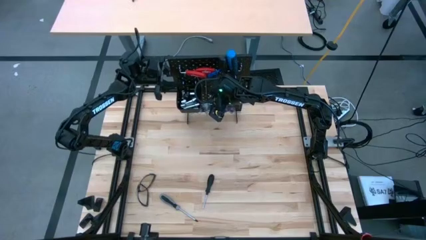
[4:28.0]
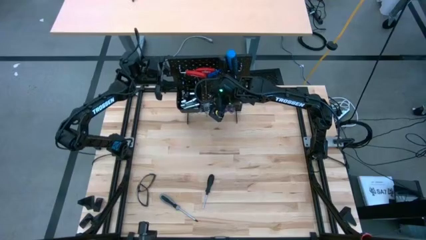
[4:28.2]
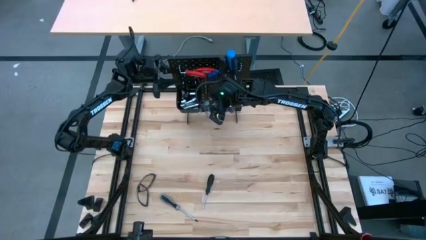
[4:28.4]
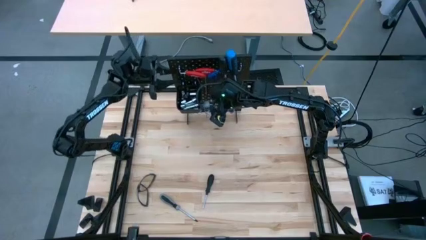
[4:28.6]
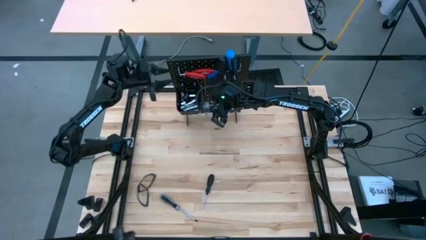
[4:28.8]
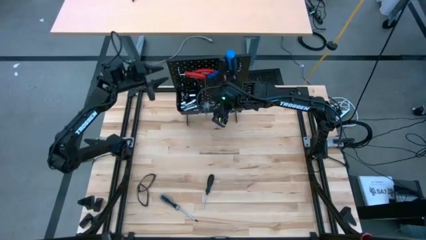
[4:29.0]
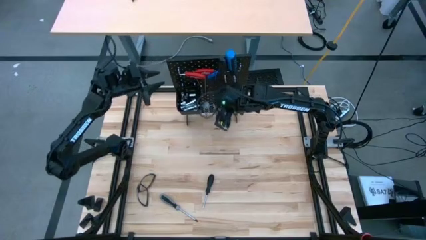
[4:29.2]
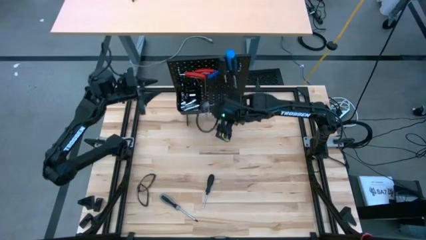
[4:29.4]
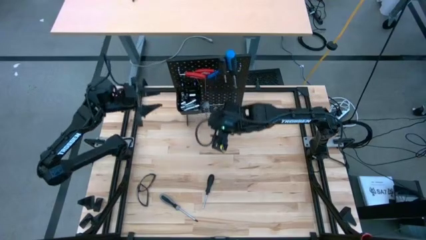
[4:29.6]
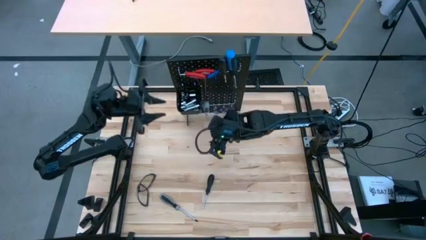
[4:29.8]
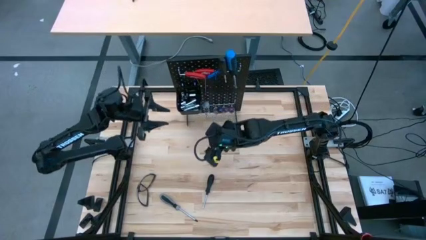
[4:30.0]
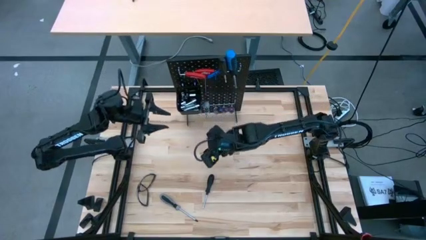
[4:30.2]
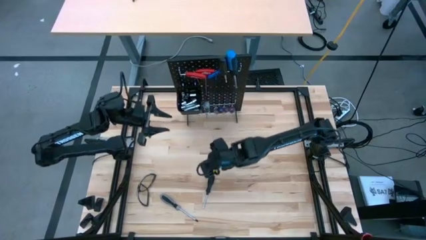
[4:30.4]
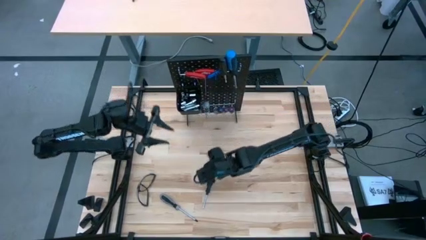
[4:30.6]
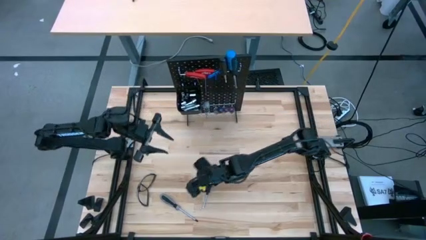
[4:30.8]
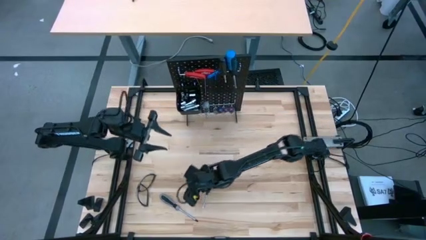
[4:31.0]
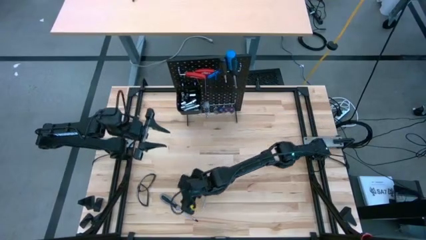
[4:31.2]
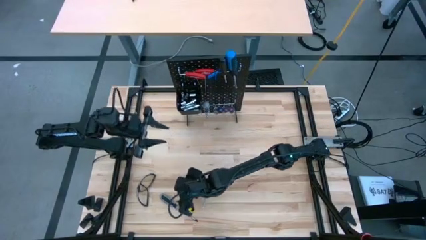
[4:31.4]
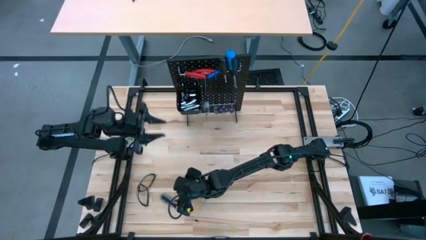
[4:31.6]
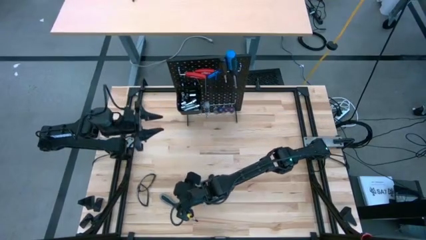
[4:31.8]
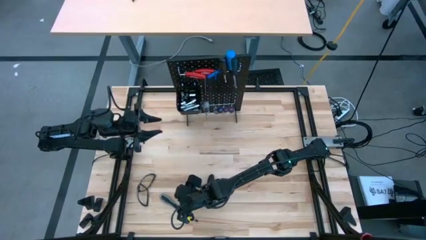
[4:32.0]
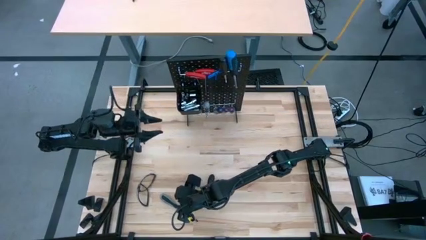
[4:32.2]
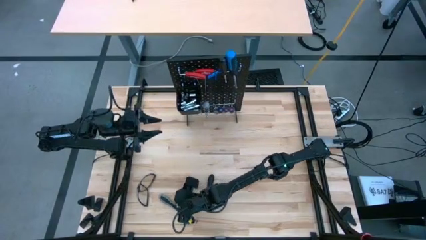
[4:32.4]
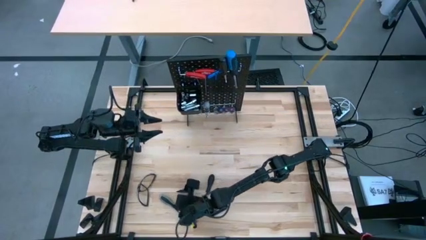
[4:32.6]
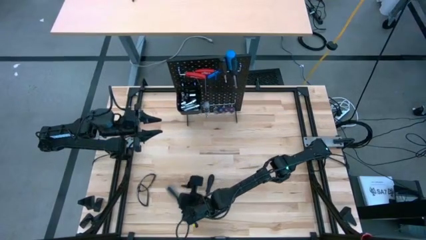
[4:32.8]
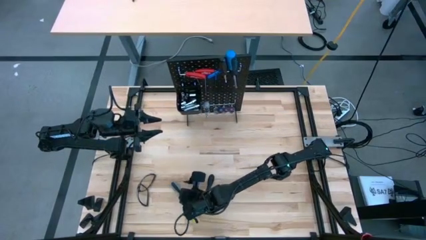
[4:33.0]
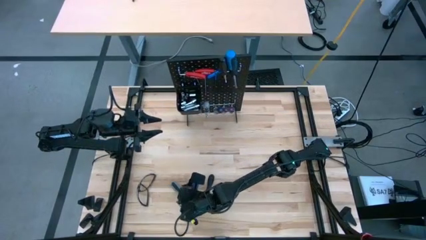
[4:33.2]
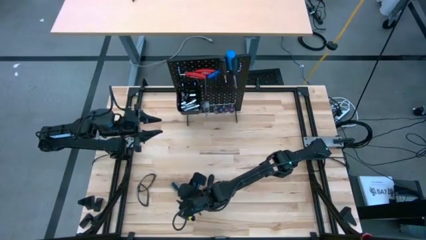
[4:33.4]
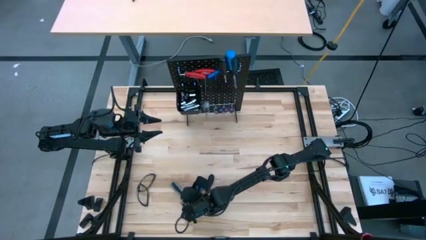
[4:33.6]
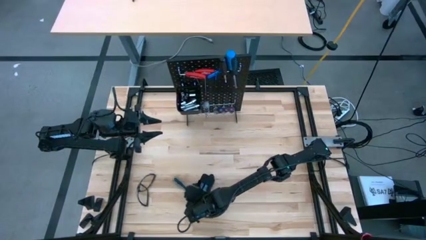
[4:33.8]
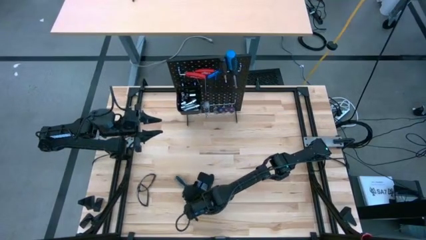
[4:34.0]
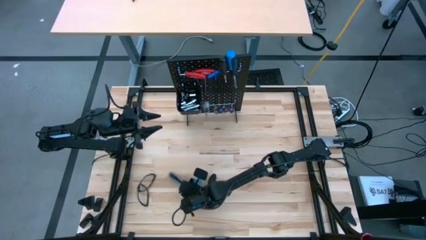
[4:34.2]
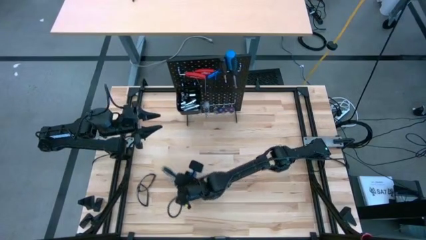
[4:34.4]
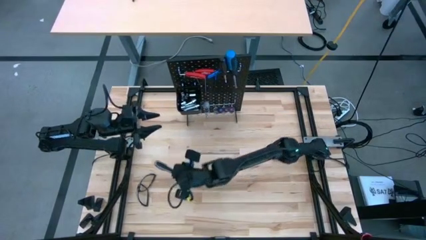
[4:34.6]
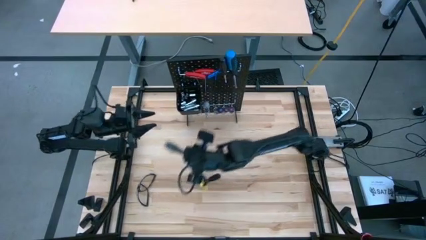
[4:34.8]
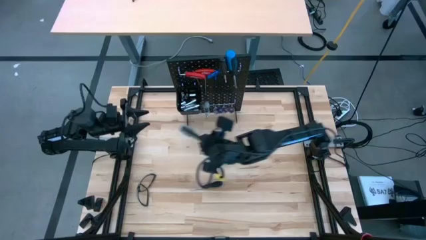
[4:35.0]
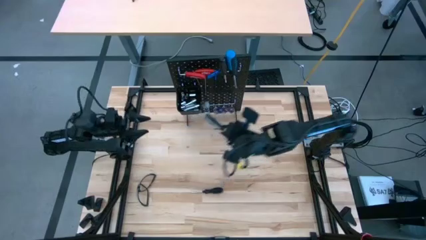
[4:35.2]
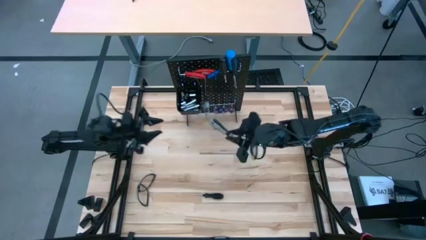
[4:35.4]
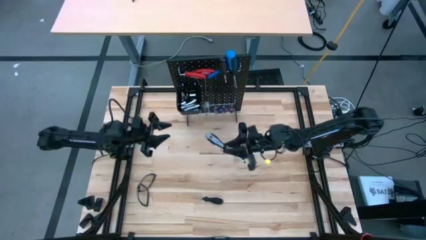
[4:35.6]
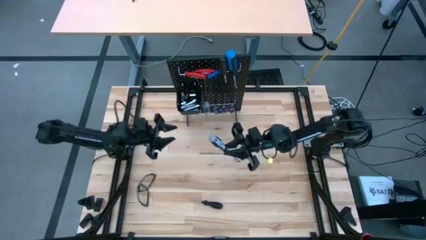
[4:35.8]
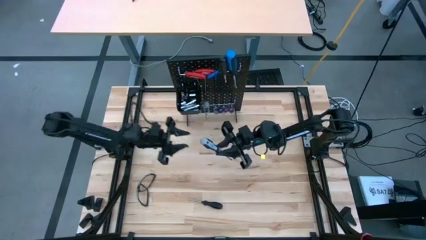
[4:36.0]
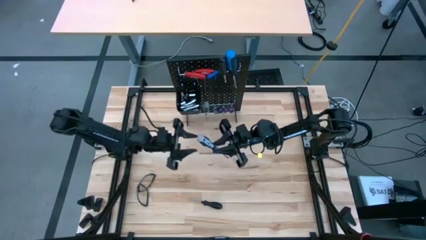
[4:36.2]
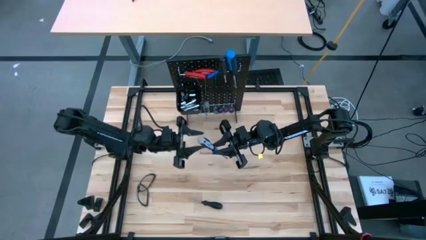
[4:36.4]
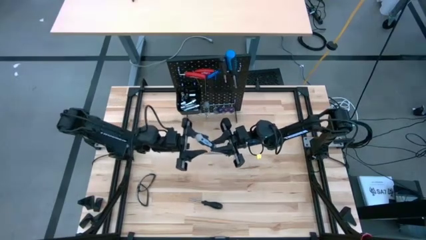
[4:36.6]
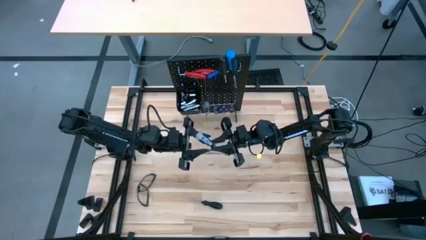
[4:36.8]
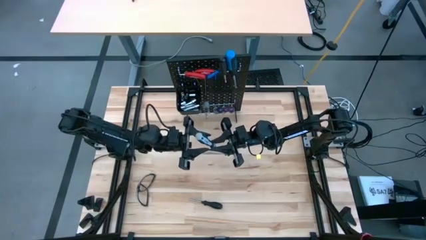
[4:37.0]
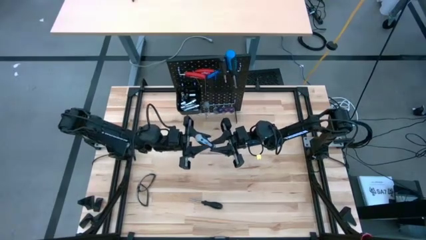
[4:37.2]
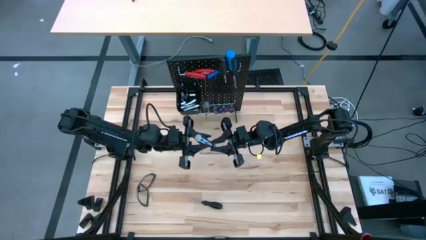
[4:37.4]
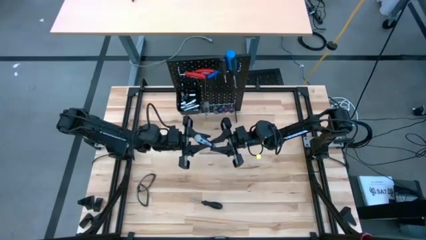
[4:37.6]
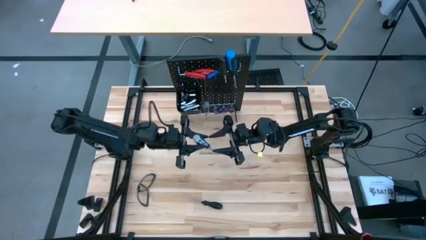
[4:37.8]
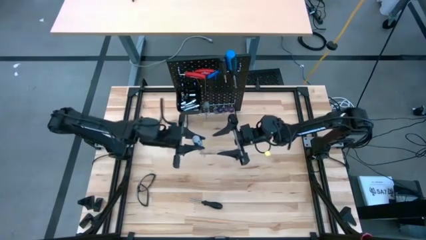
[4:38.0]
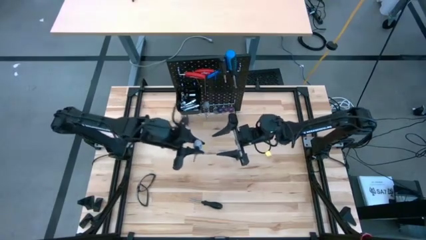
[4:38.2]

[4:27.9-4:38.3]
Task: Hang tools onto peg board
Hang the gray screwdriver on the pegboard

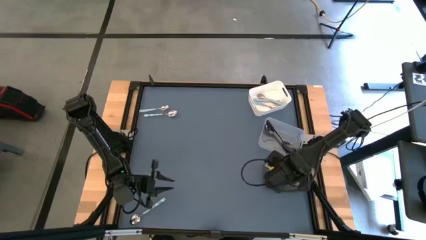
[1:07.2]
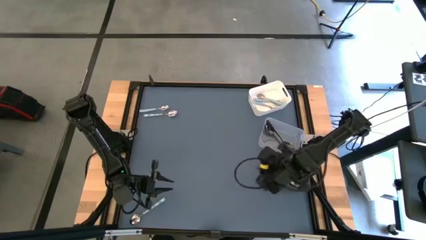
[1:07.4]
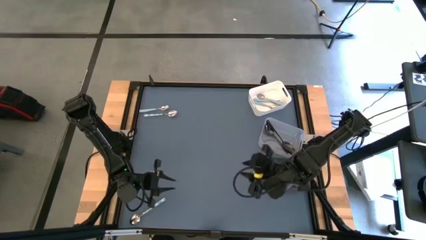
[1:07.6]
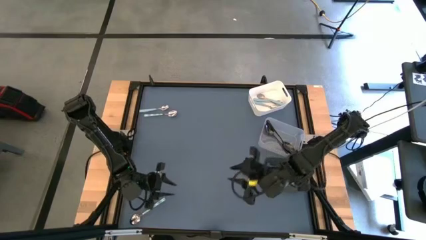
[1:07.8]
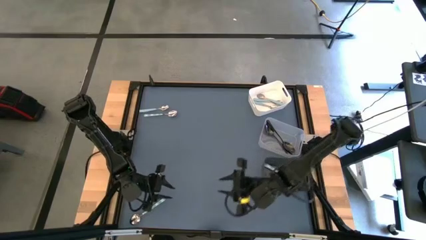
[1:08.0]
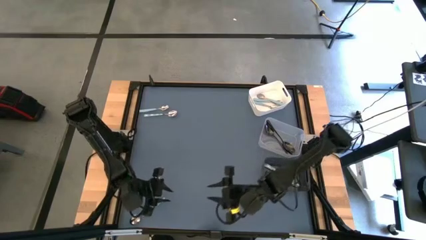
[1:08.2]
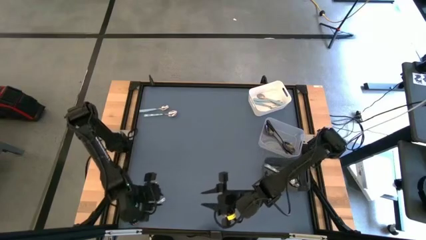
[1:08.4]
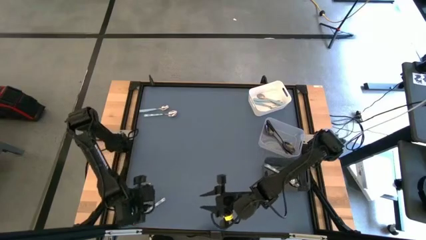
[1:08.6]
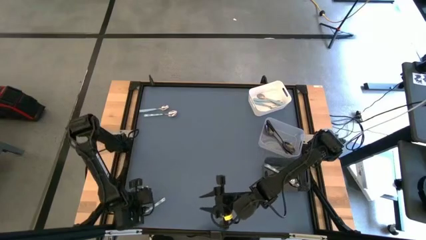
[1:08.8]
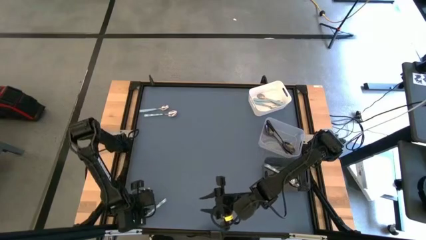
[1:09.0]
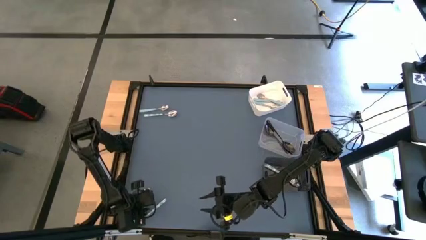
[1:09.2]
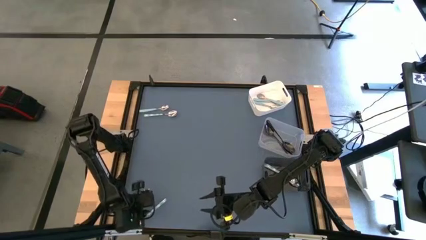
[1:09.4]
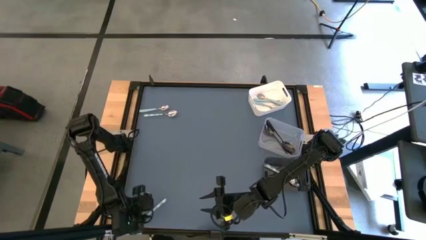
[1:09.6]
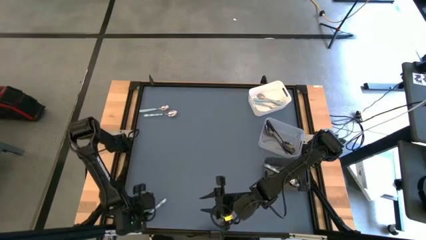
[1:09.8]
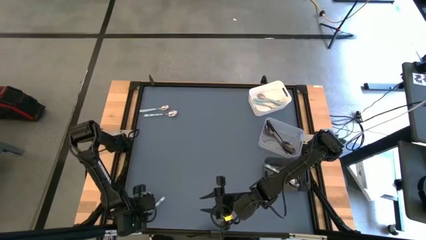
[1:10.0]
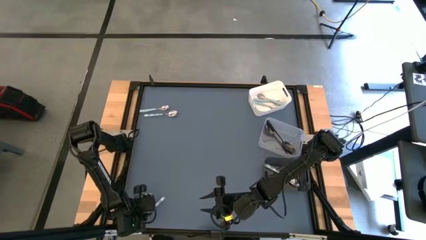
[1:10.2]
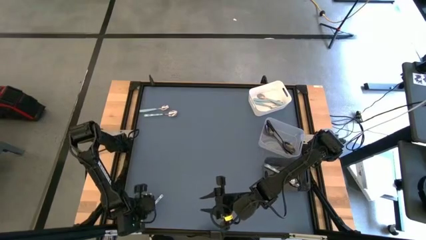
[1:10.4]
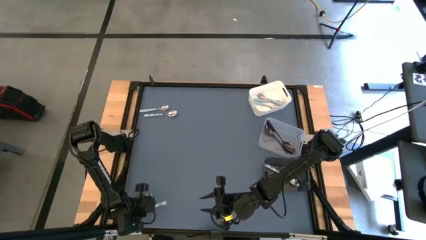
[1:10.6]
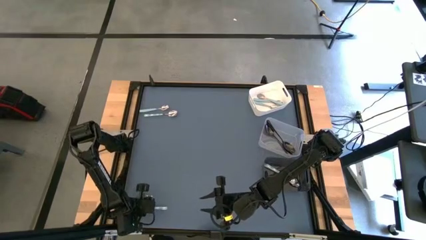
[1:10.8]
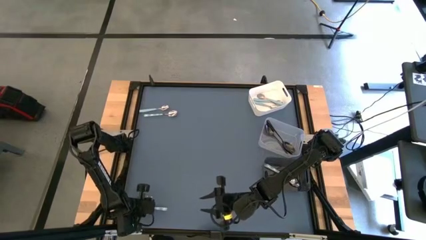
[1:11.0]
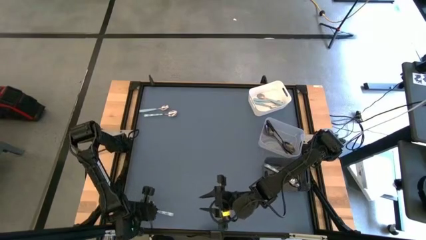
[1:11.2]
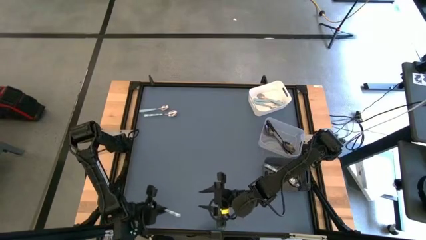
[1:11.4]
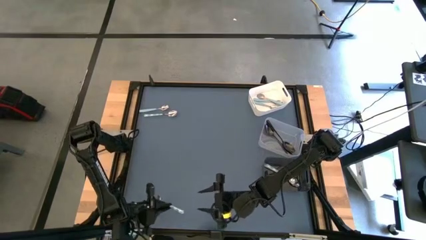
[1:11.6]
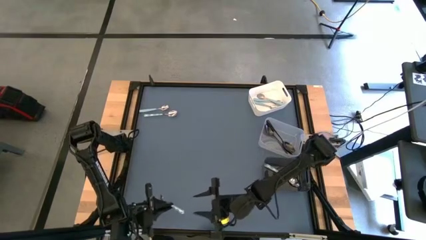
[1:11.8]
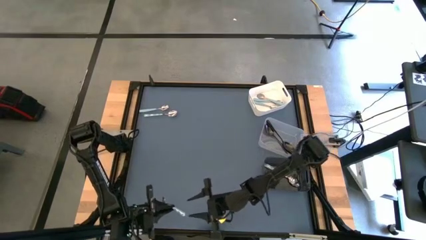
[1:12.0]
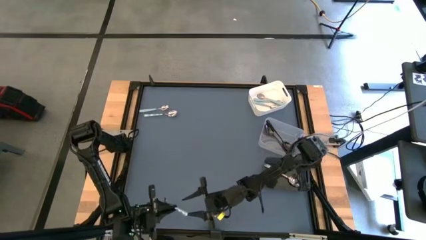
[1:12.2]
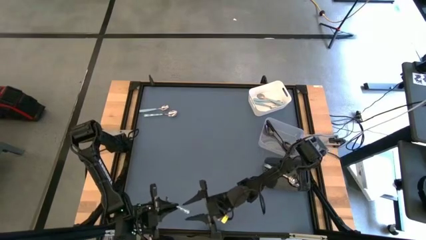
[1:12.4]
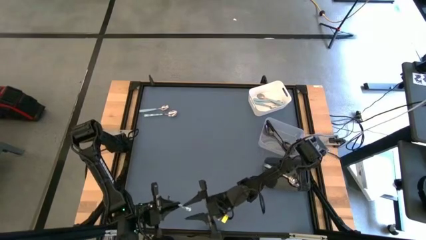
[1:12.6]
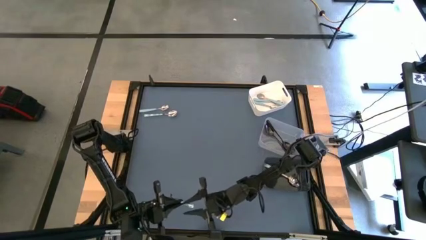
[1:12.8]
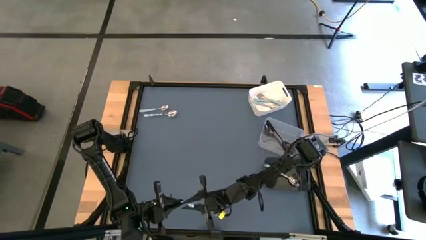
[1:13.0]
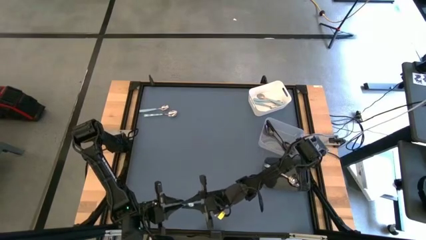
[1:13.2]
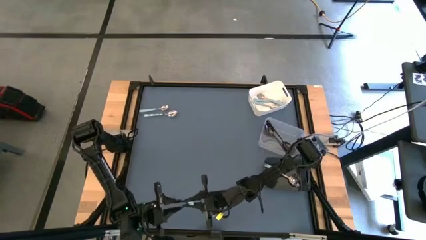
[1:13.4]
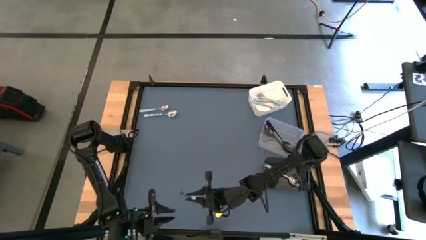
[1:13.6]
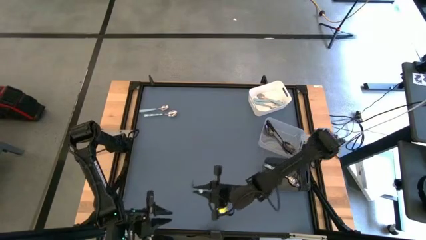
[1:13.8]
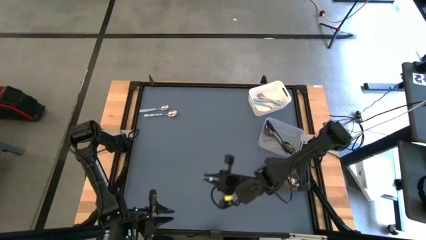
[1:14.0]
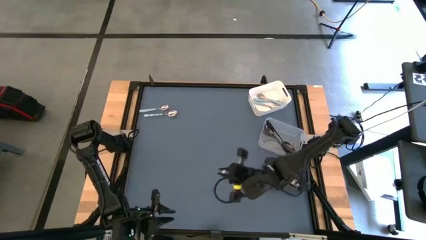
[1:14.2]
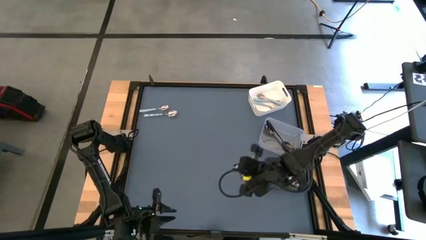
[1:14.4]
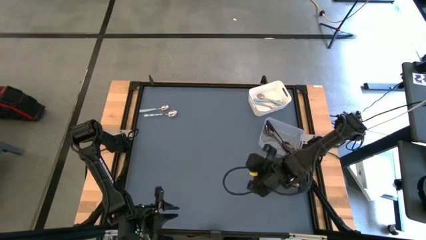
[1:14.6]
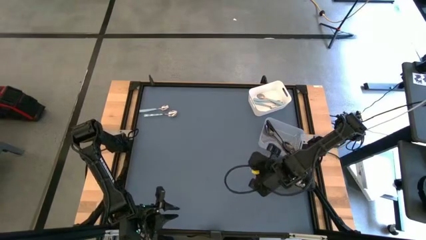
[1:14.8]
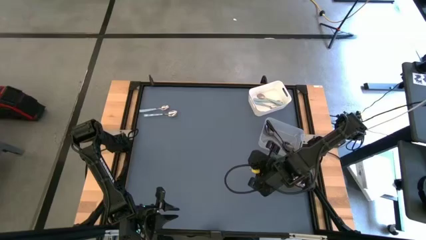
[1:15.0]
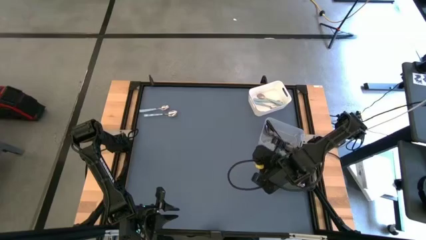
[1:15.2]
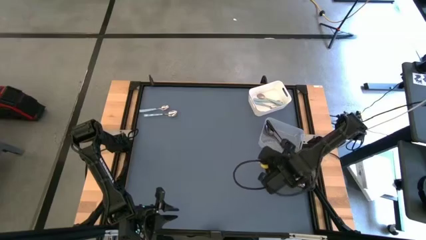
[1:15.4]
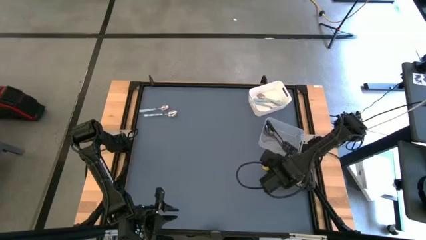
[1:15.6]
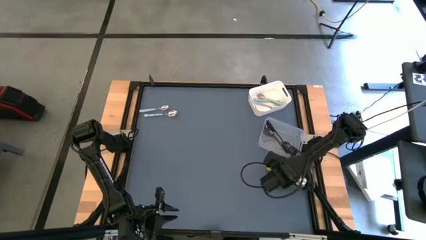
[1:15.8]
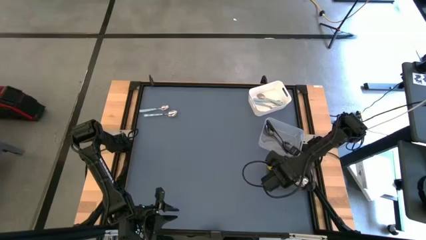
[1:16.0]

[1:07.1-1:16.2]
Task: Sort silverware by color (type)
Put the bottom white and blue spoon into the black bin
